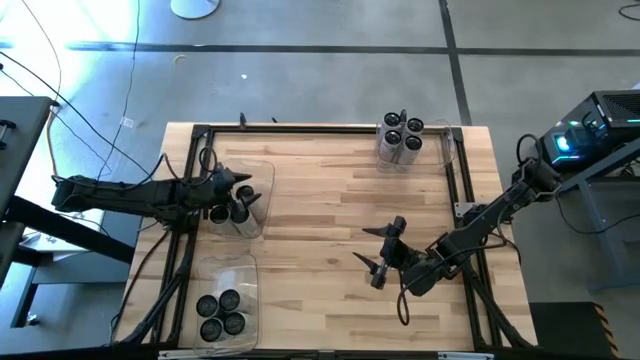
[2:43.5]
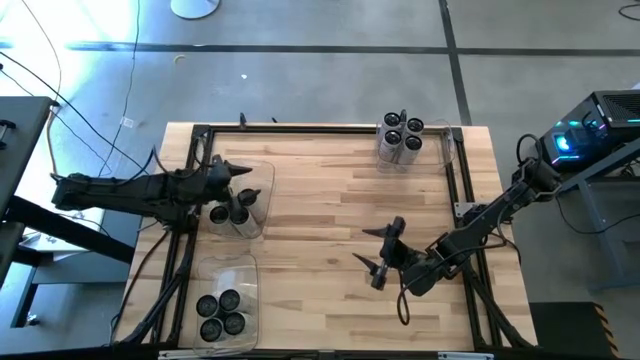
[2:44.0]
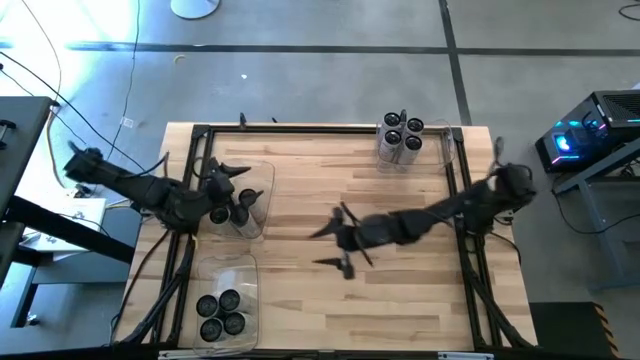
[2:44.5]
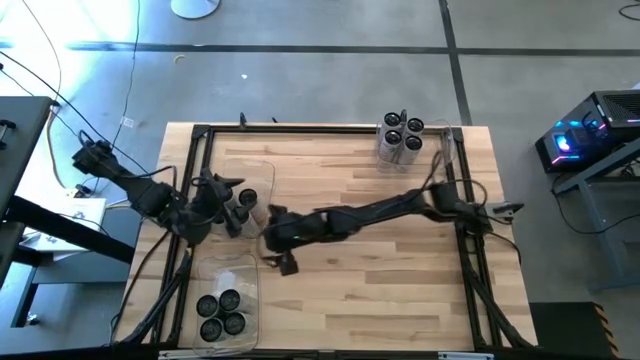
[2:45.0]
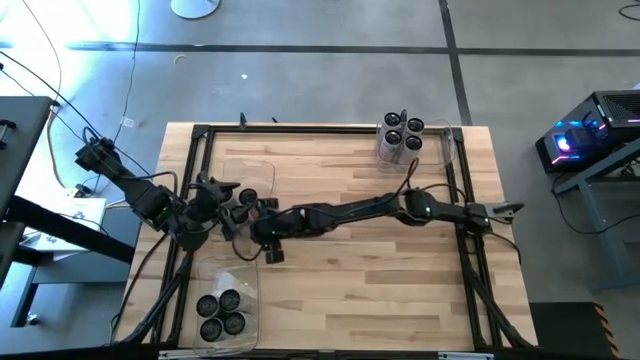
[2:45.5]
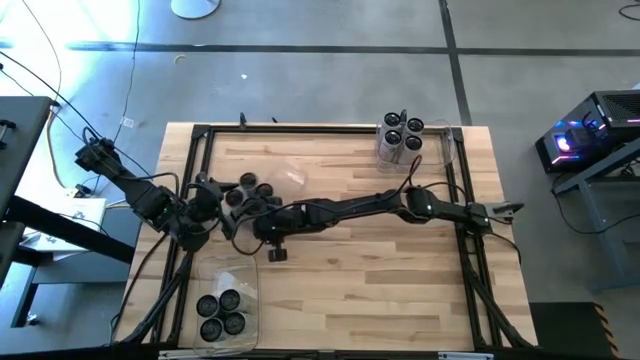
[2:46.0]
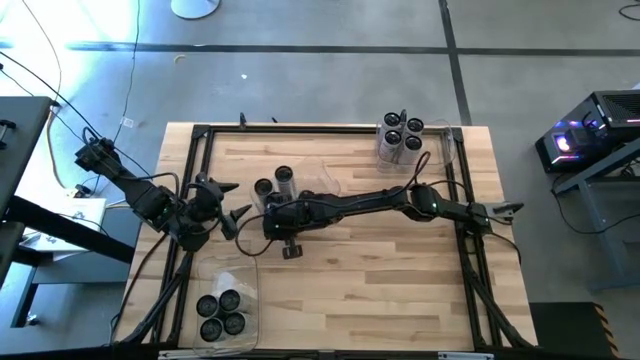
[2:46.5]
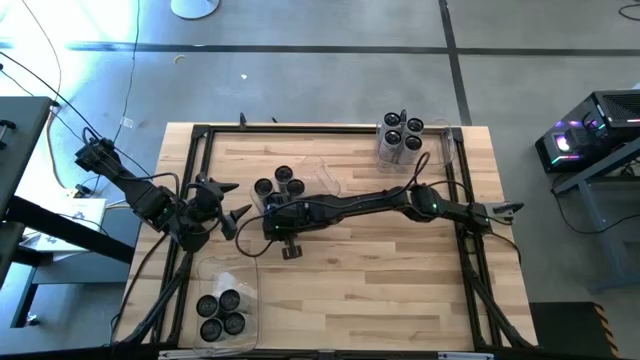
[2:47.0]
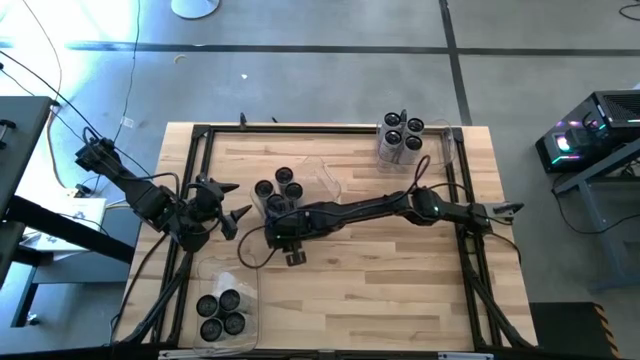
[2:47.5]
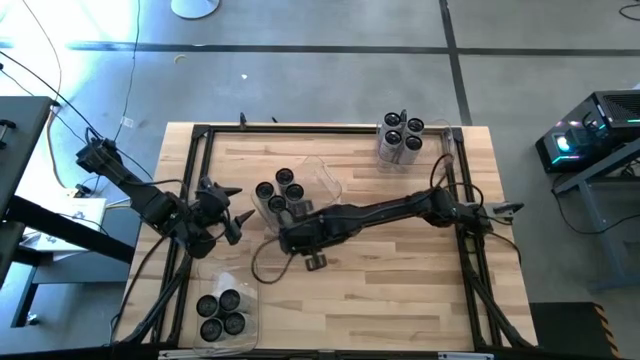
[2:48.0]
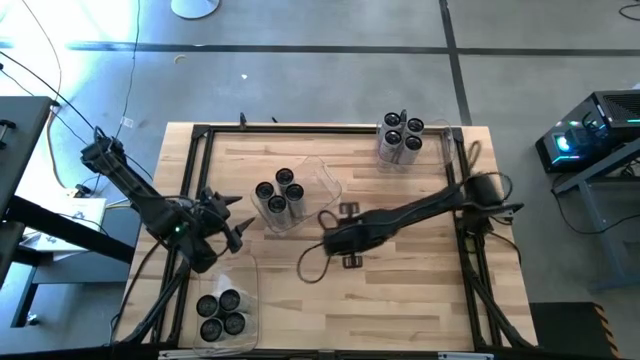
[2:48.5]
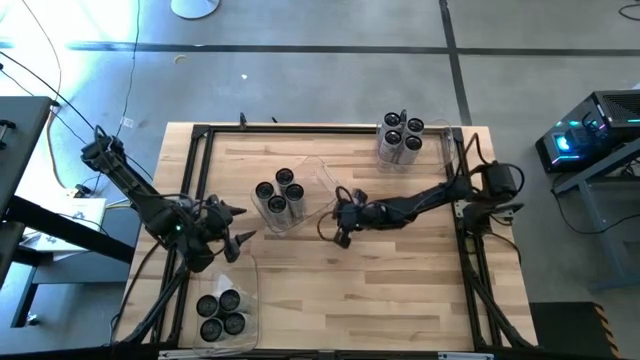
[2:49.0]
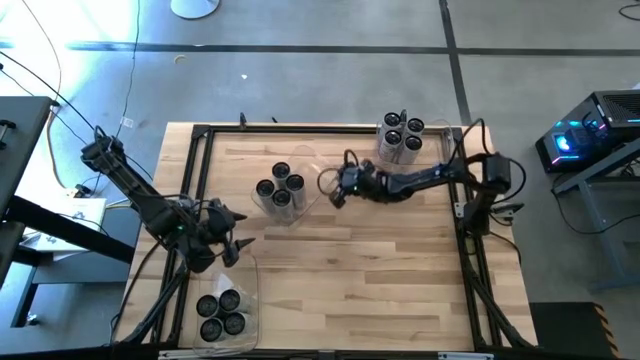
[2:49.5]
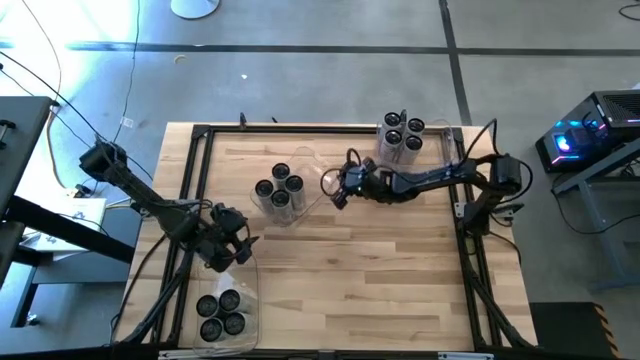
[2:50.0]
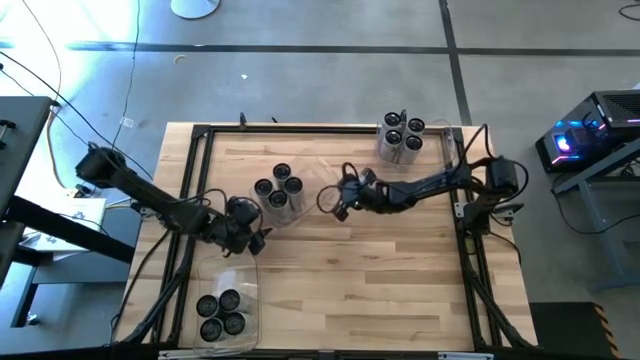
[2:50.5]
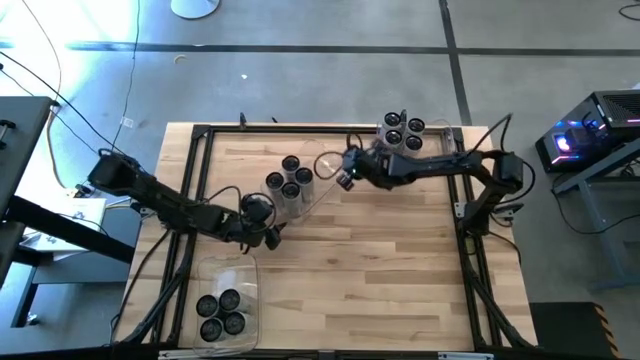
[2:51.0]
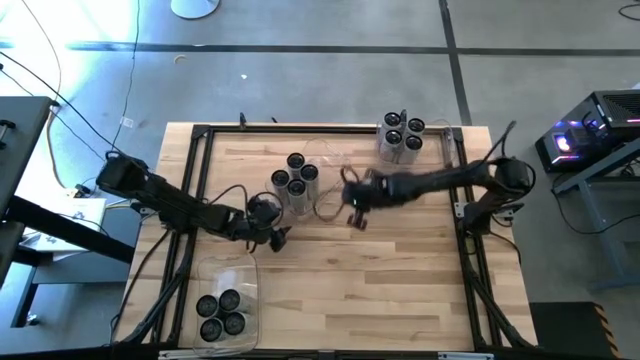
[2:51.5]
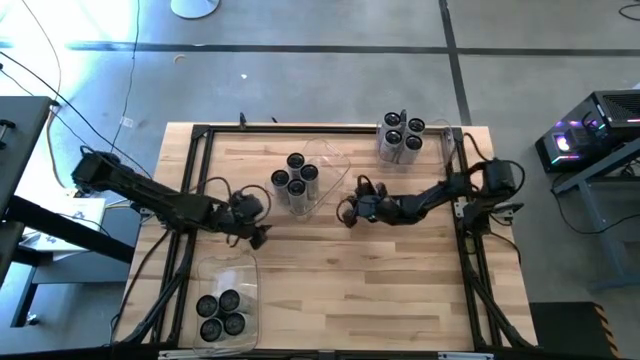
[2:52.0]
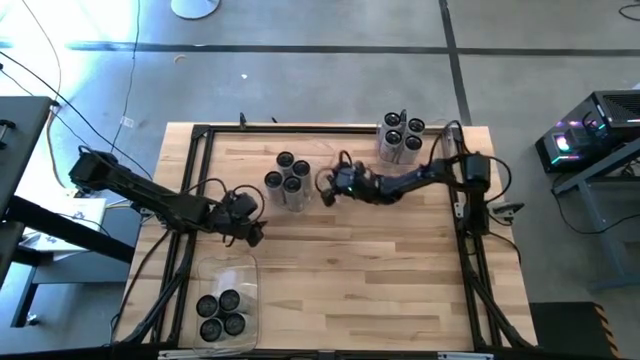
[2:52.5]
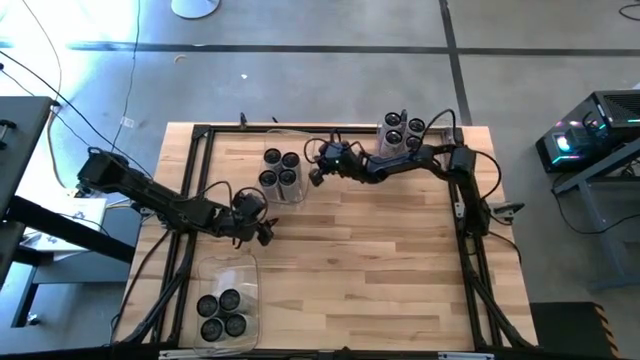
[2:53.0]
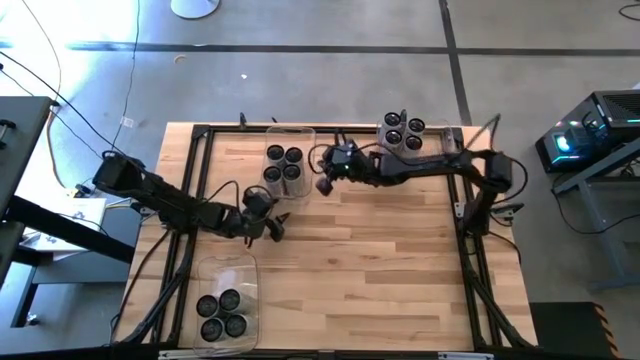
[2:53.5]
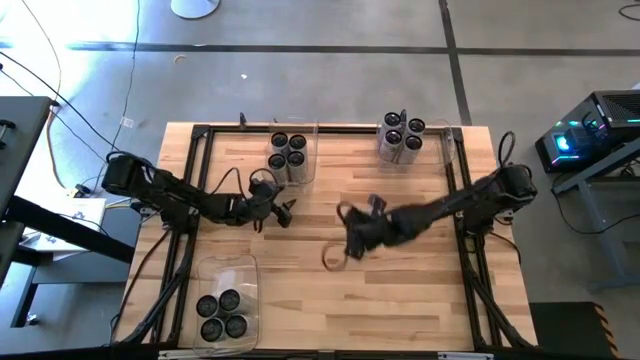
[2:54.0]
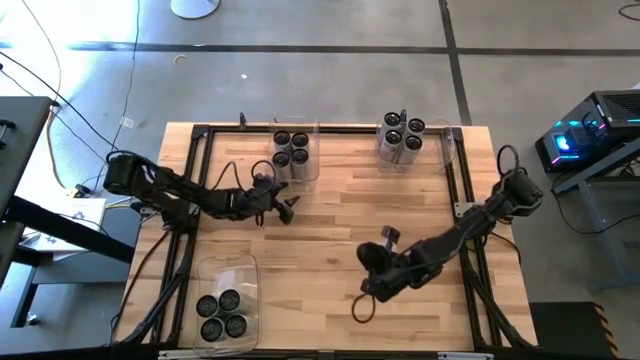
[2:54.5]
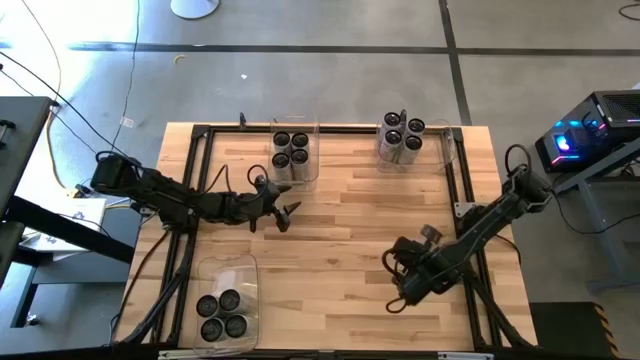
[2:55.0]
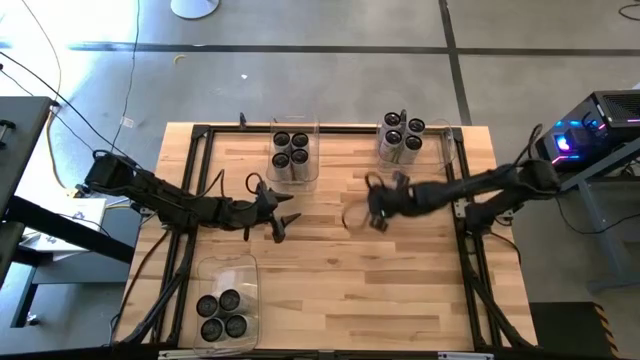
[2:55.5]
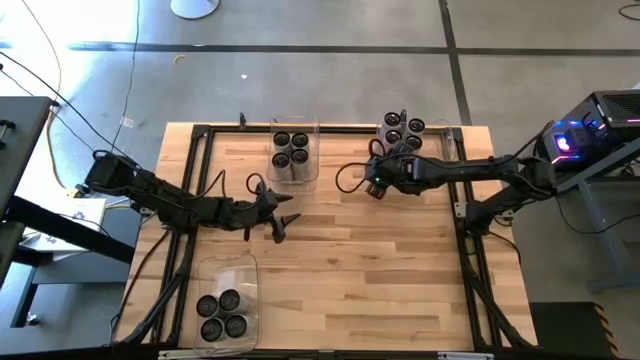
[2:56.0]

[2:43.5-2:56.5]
Task: Sort soda cans
Adjust the top left and right transparent bins

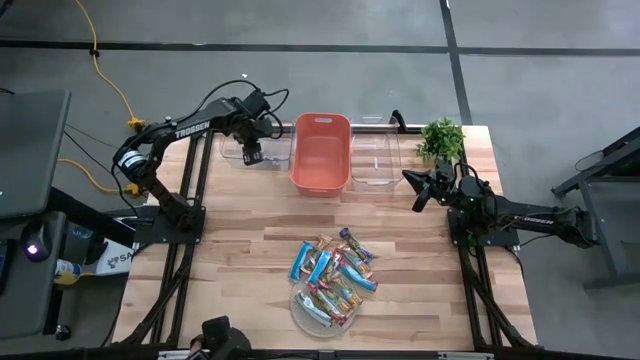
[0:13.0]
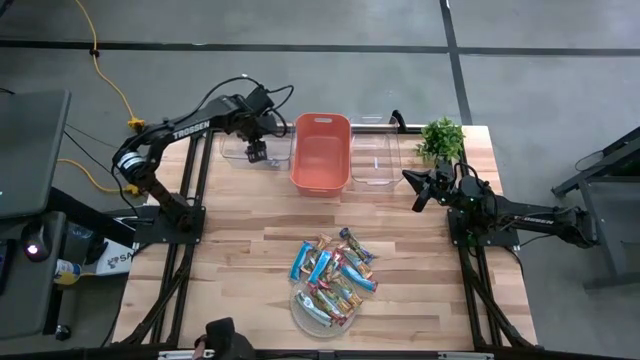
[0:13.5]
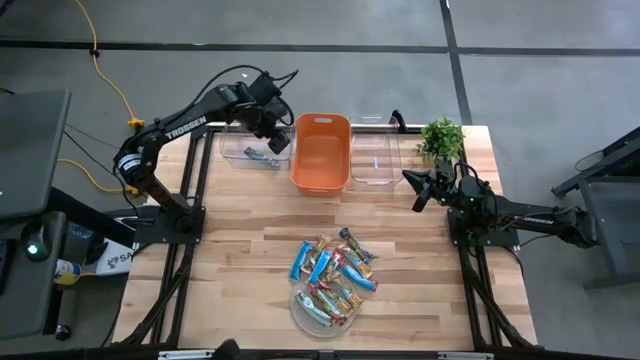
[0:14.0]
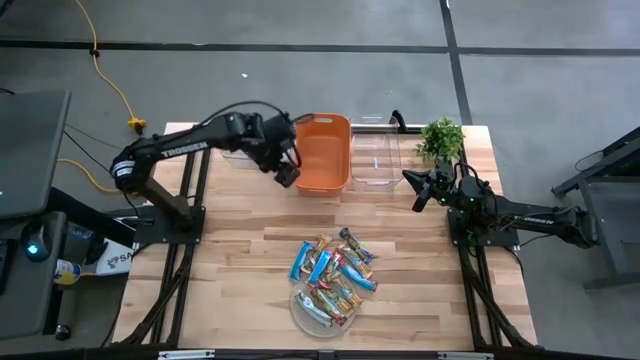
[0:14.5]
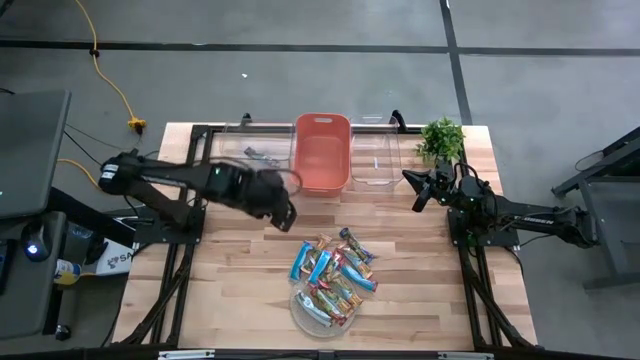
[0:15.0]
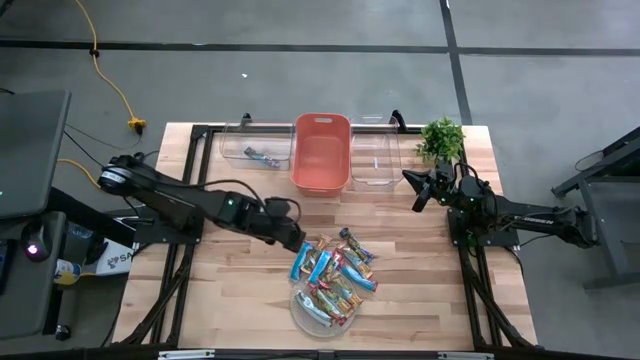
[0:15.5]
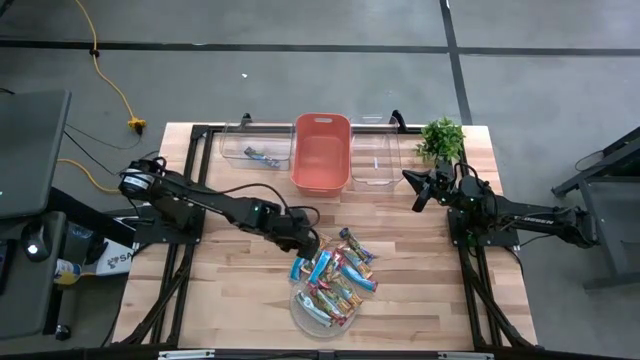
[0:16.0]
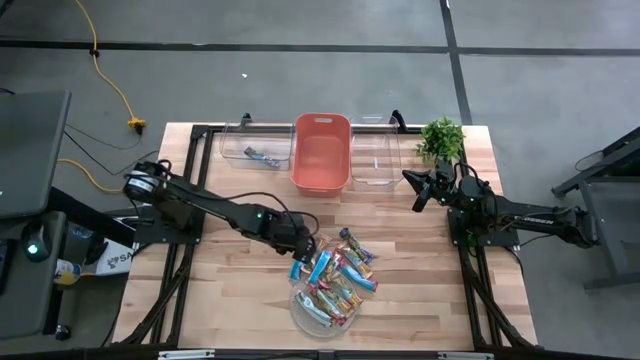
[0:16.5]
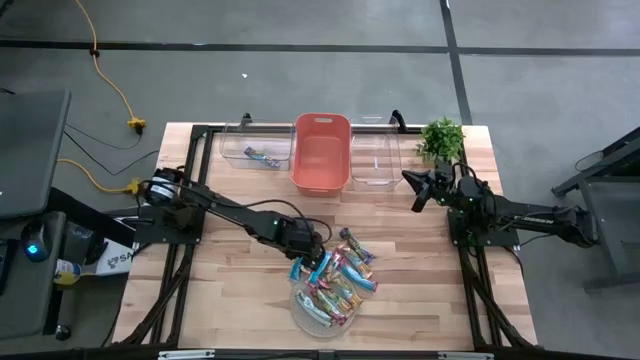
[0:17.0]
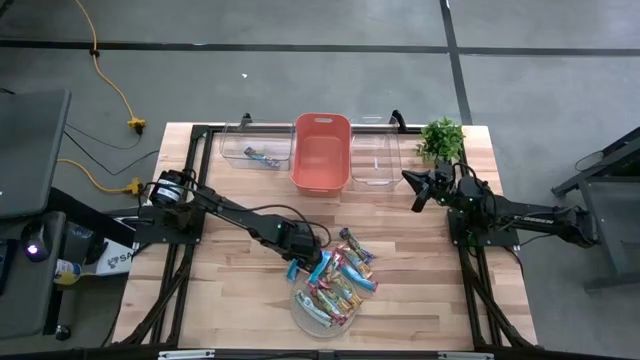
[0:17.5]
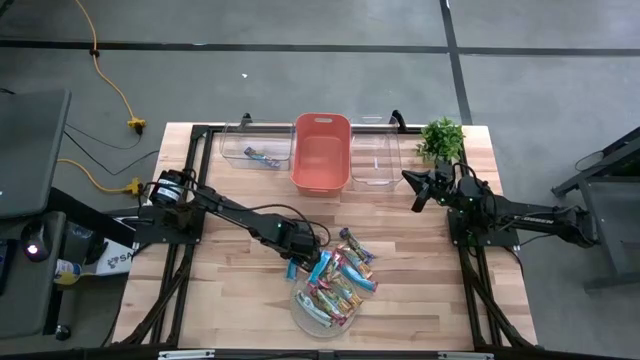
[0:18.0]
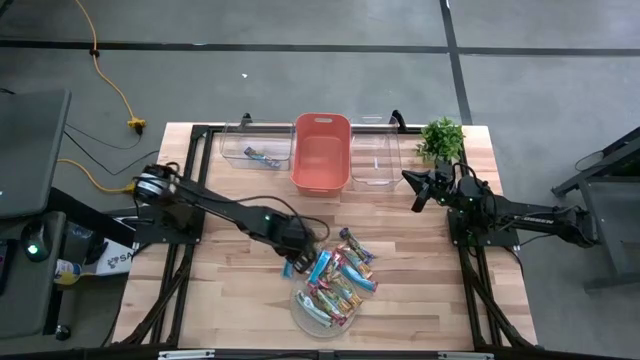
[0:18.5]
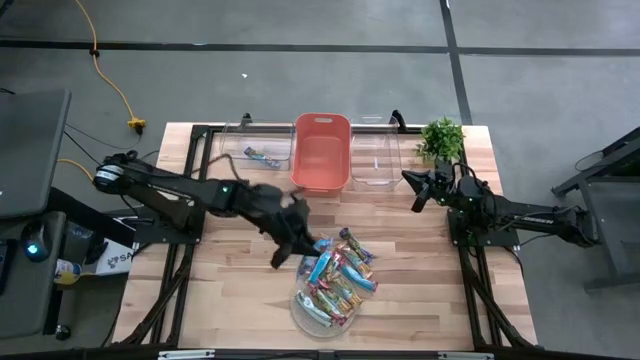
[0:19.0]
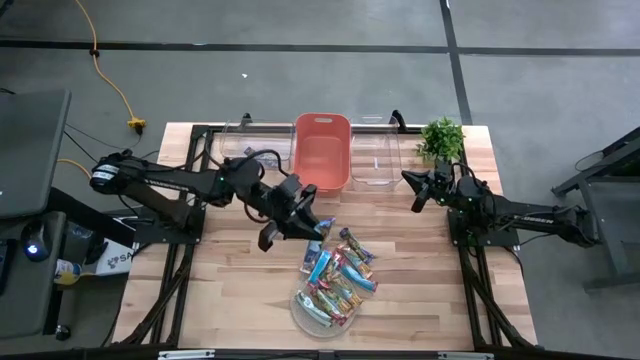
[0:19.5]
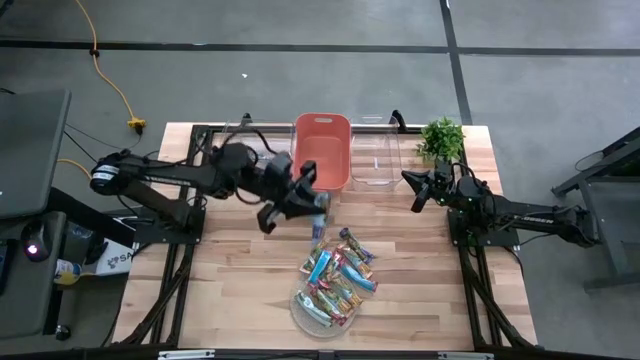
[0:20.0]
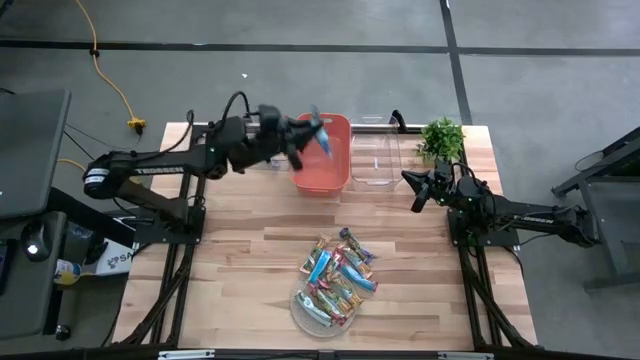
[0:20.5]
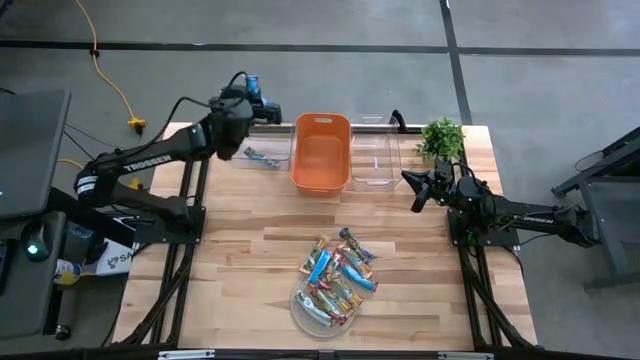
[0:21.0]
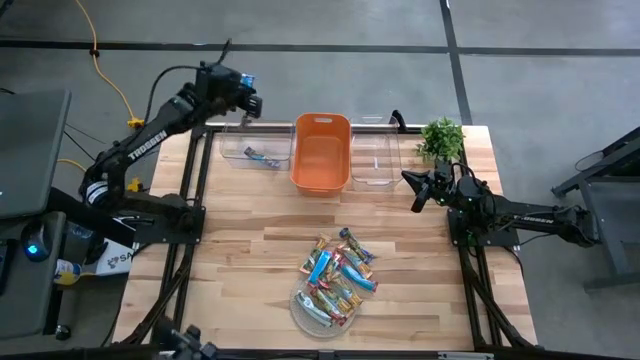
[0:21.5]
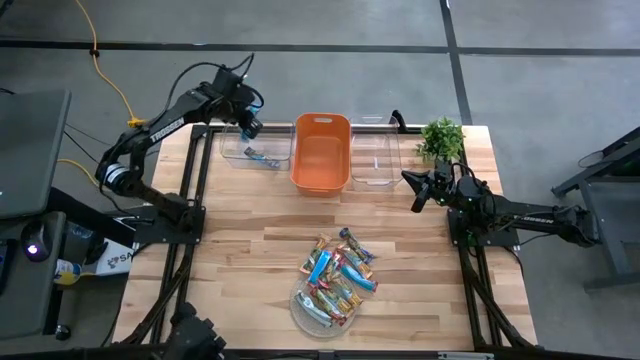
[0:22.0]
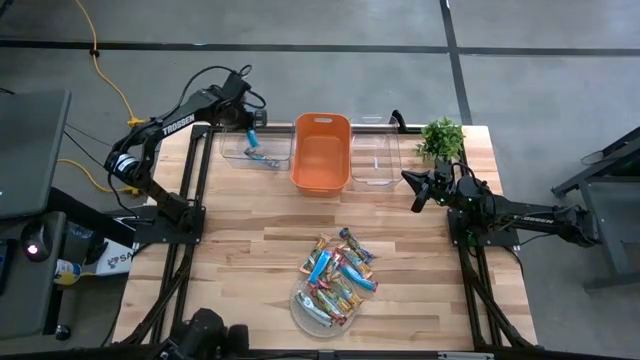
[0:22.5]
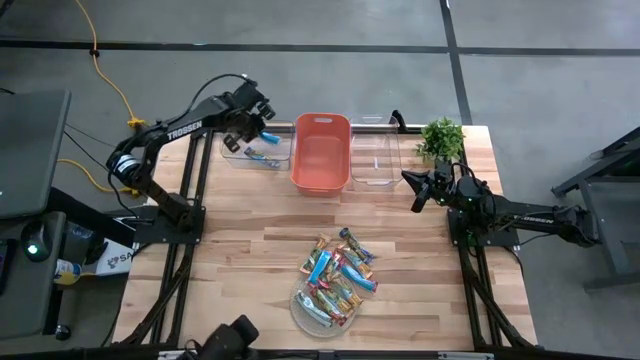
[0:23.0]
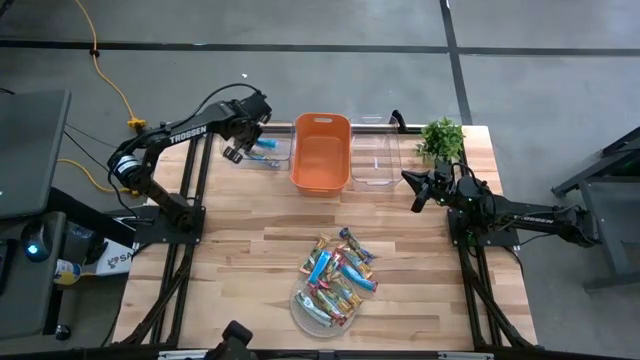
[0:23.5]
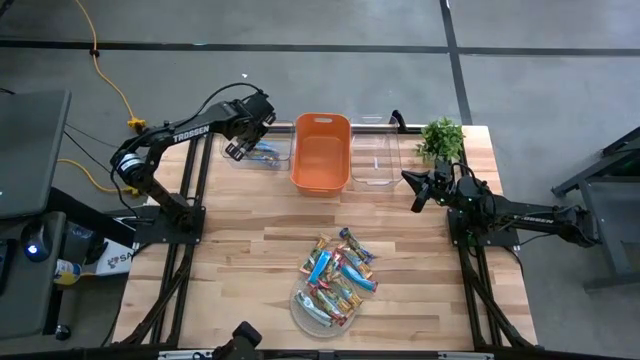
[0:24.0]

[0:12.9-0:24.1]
Task: Pick and place Granola Bars by type
Put the blue granola bar into the left transparent bin
